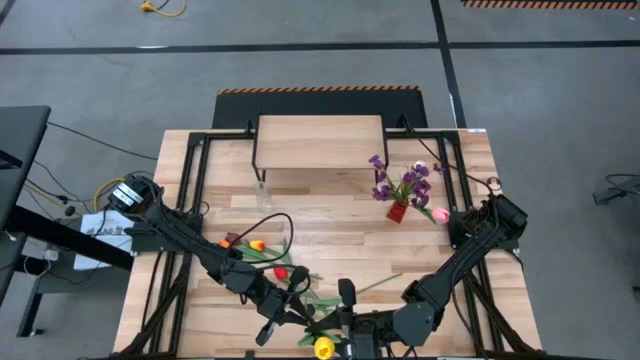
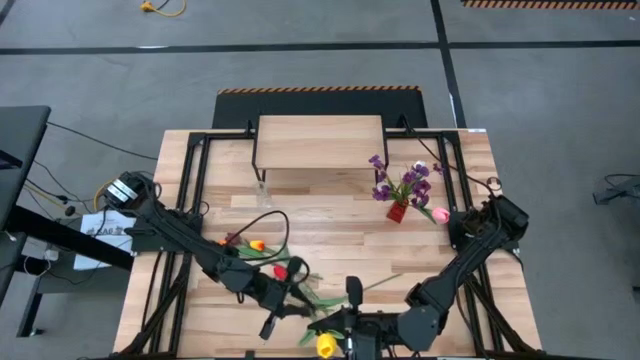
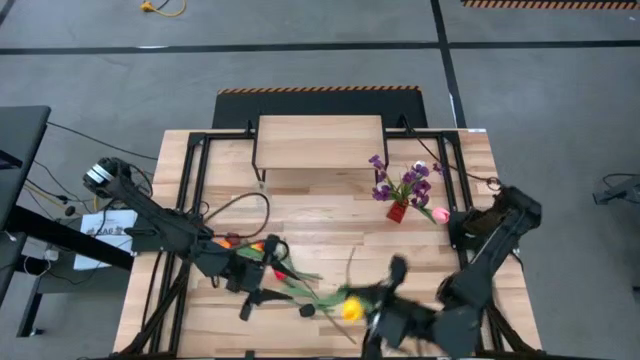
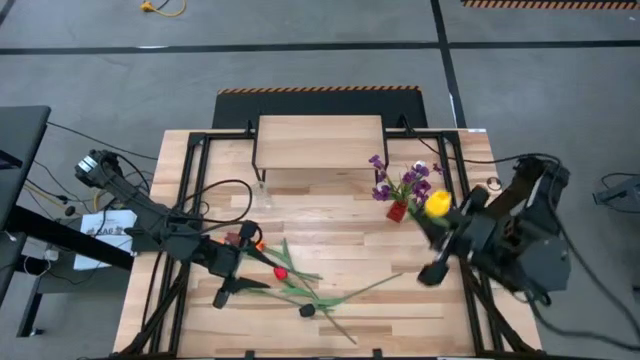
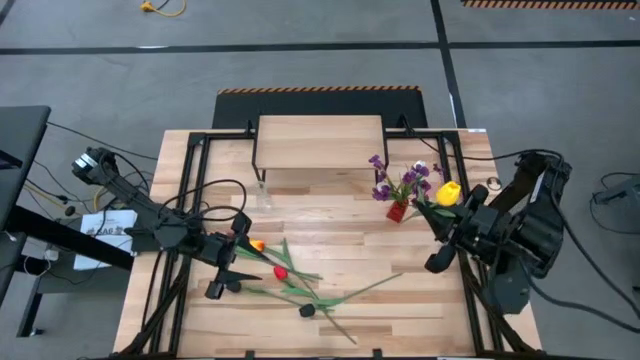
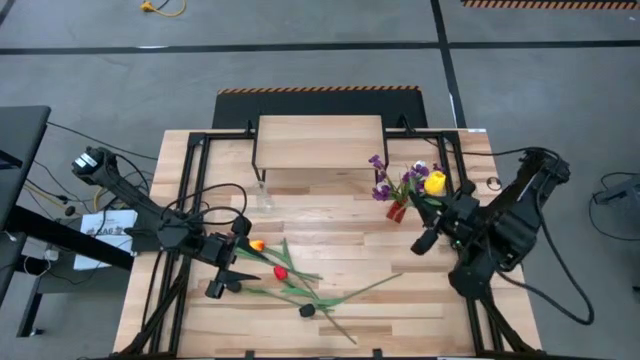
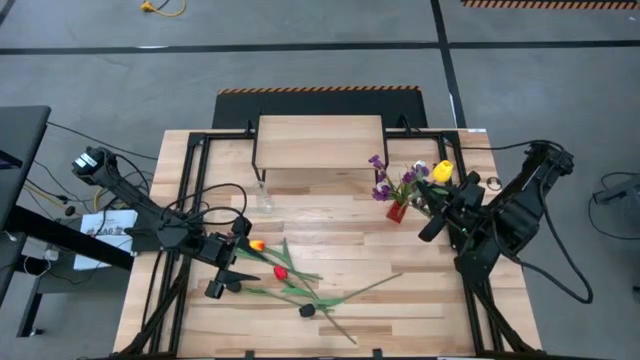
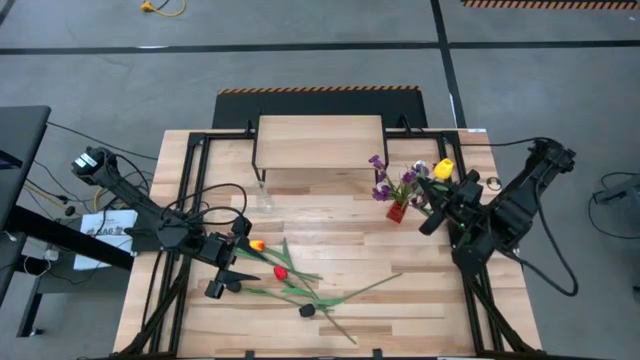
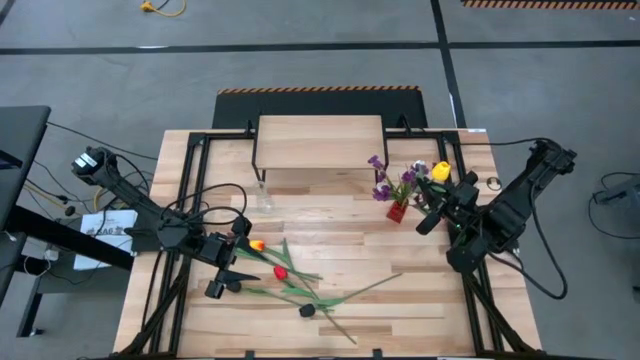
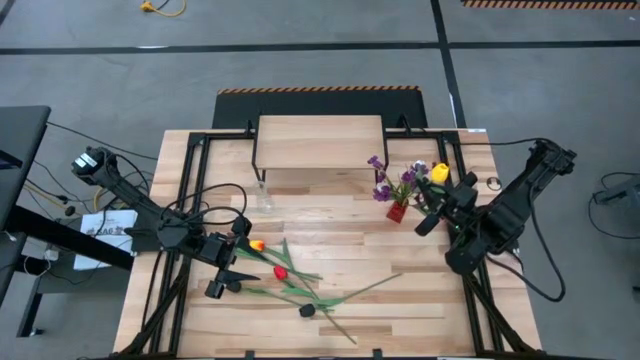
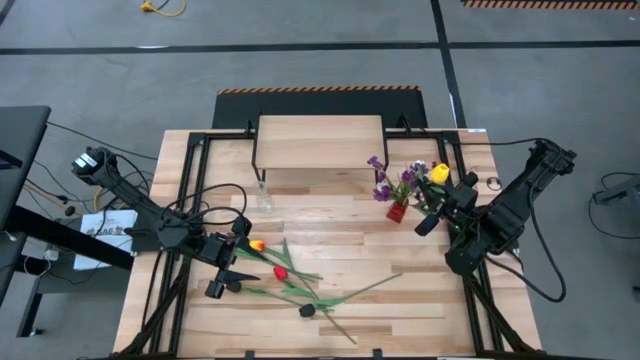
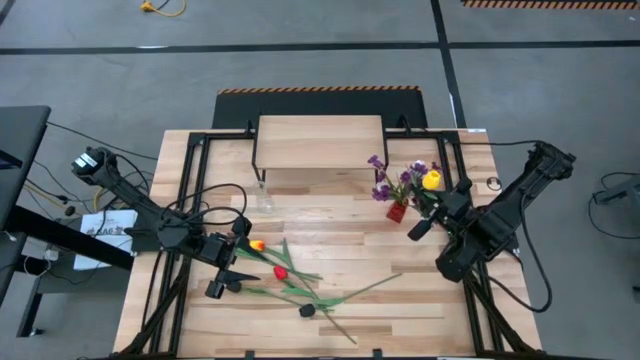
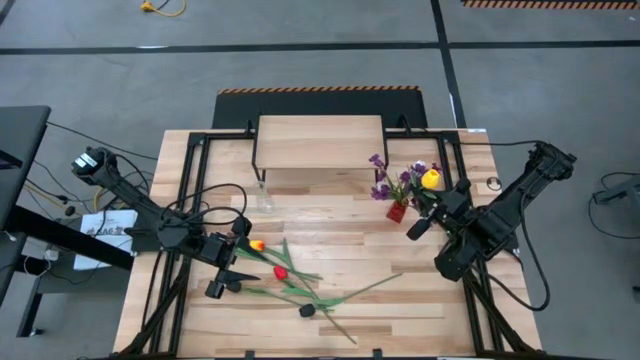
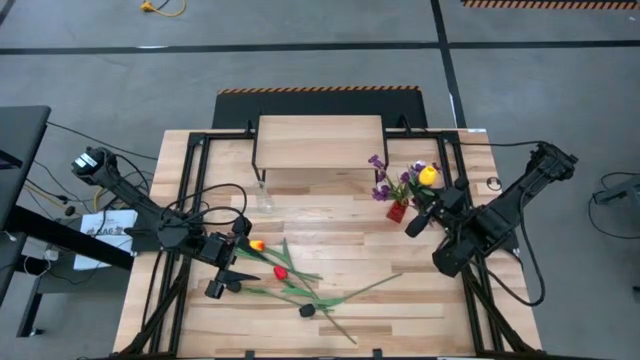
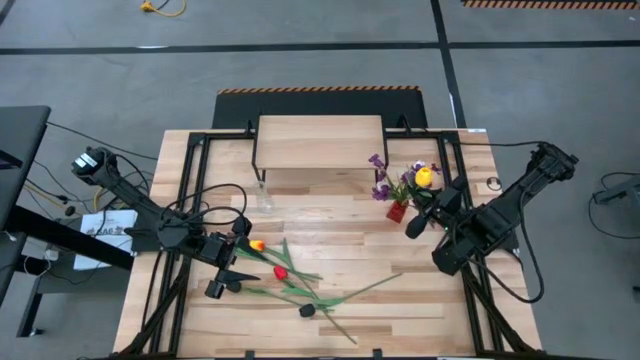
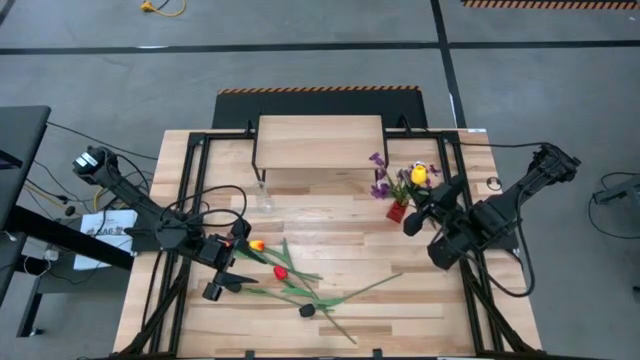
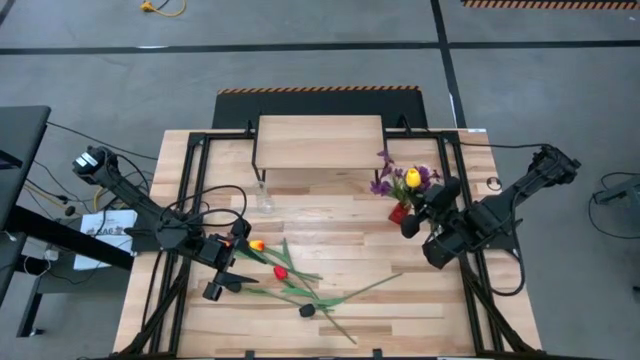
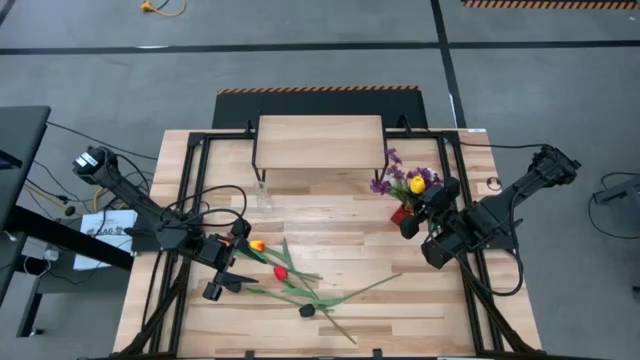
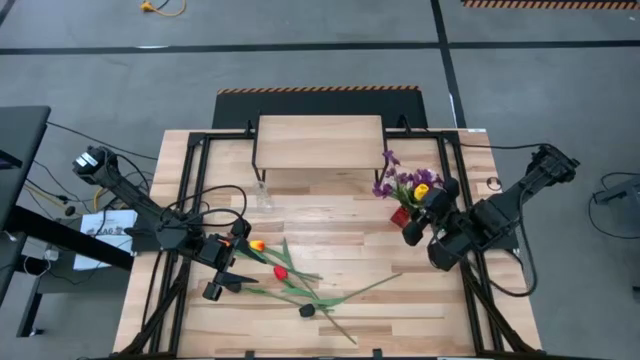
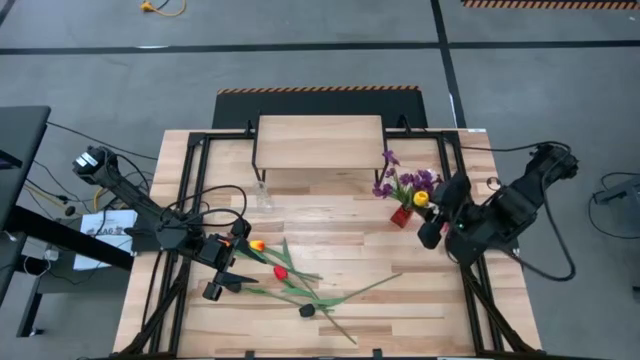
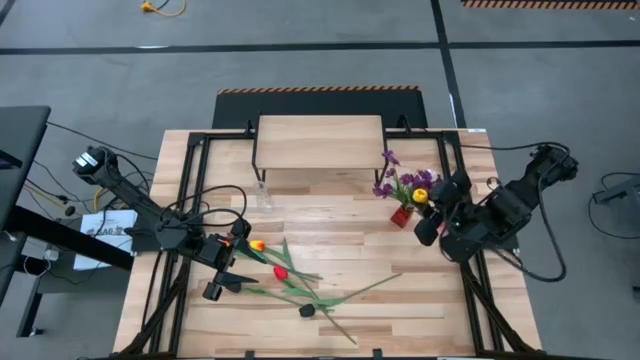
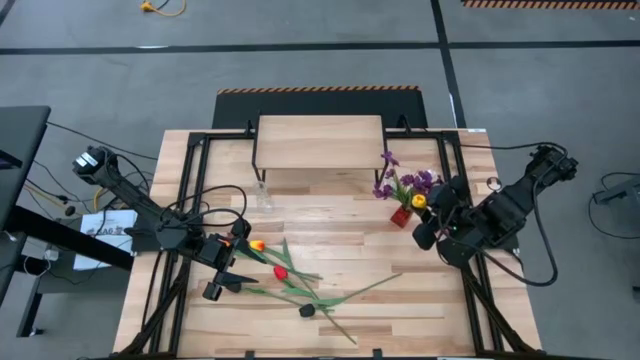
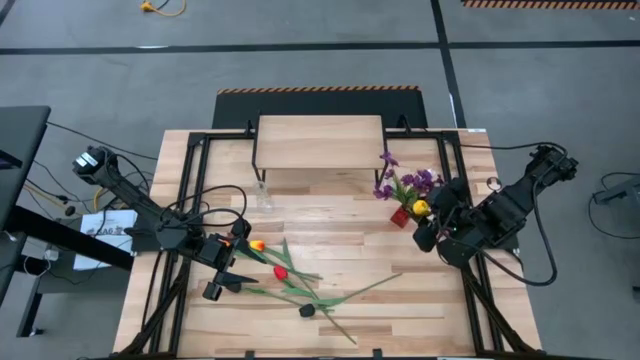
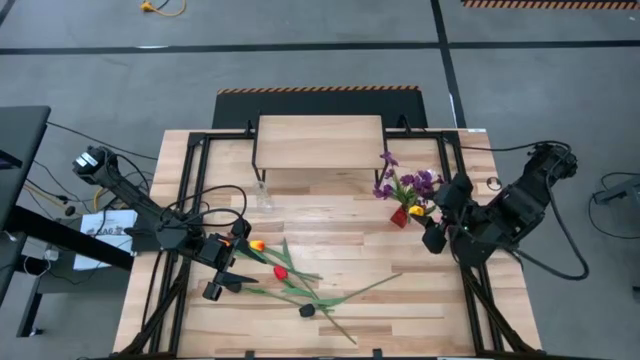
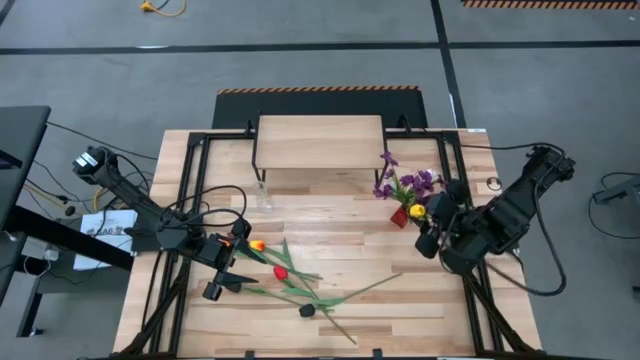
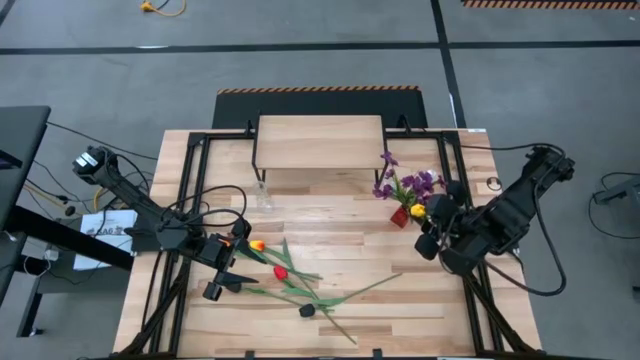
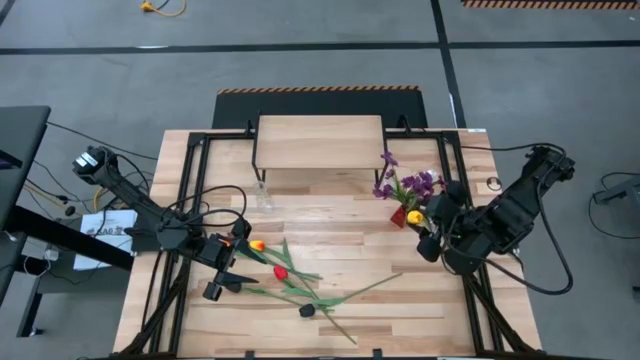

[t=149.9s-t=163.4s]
Task: Pick and place flowers into a vace then onto a shelf
Put the right yellow flower into the red vase

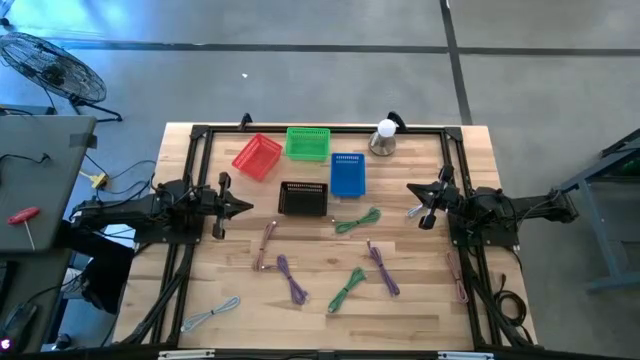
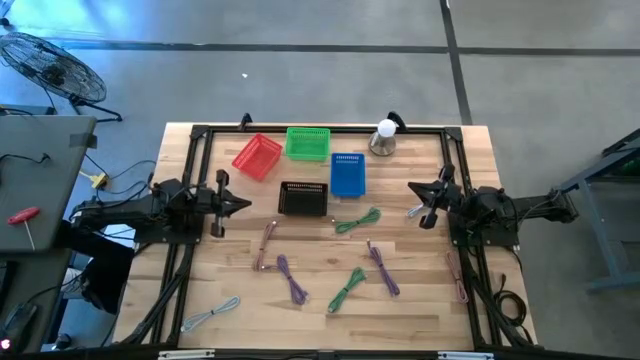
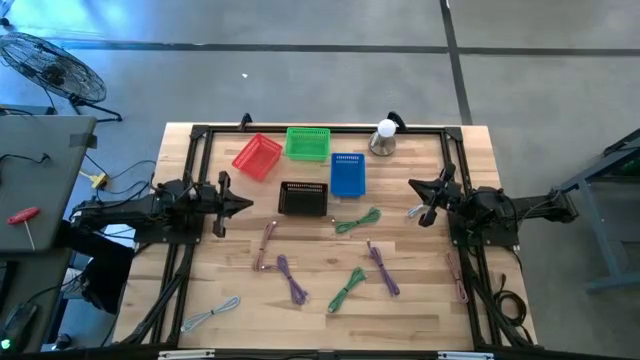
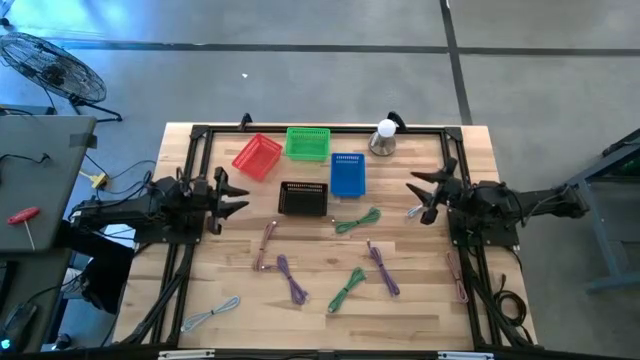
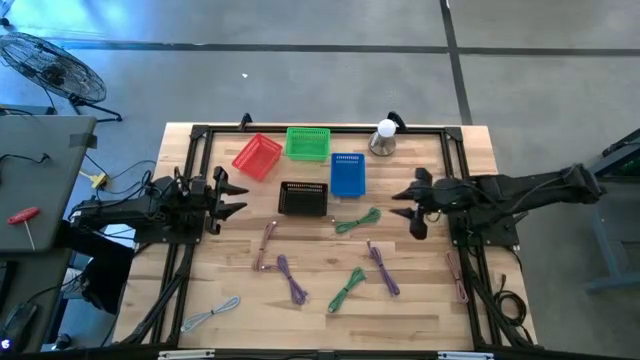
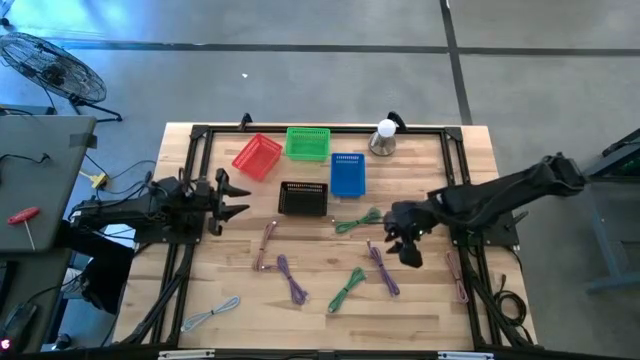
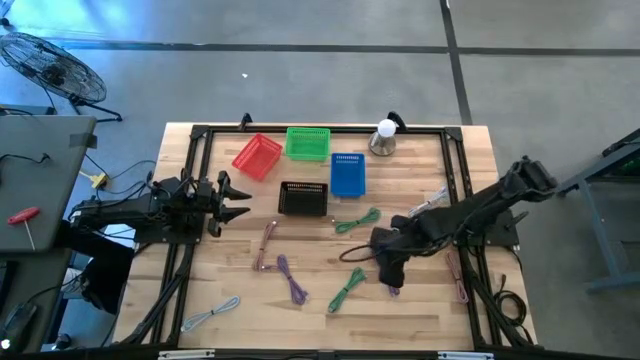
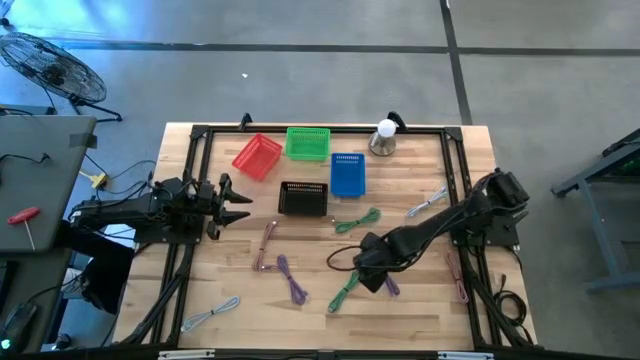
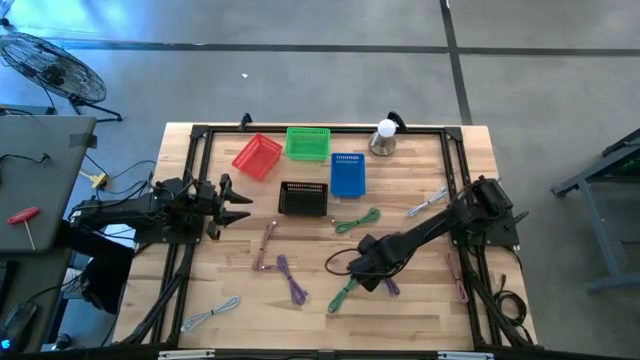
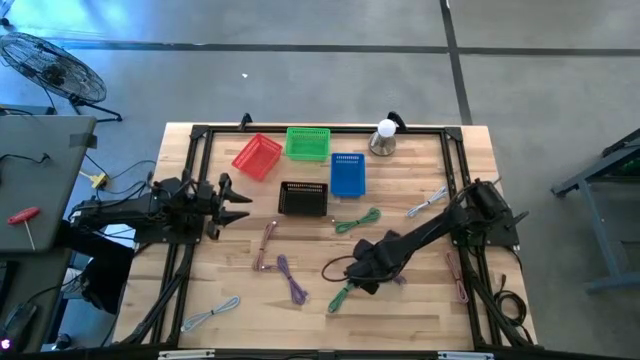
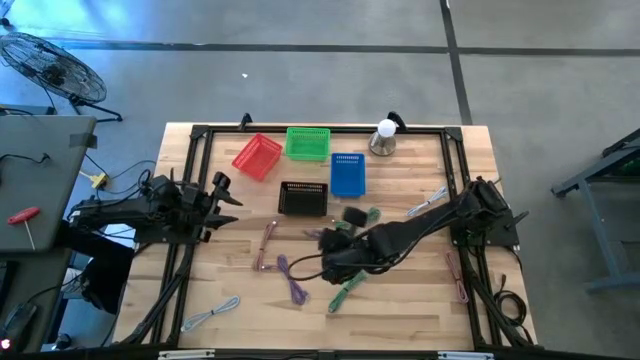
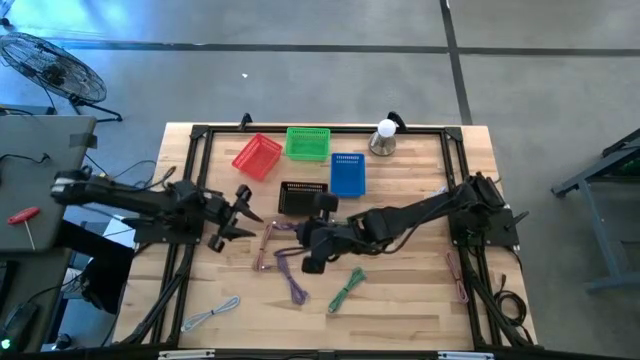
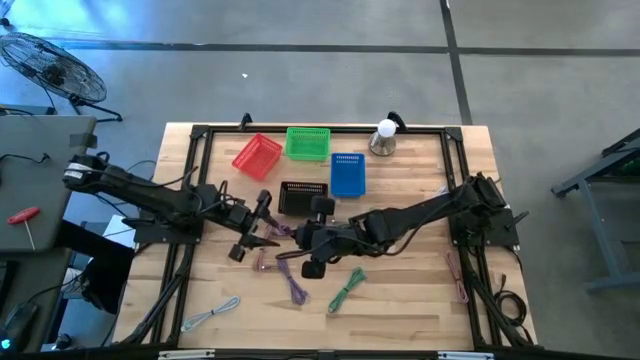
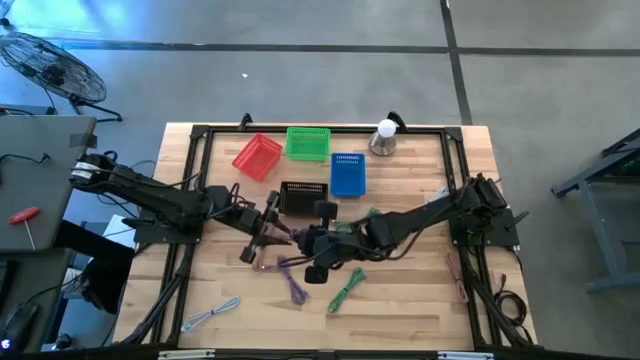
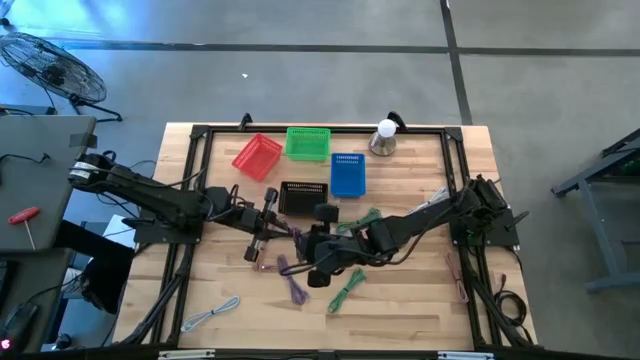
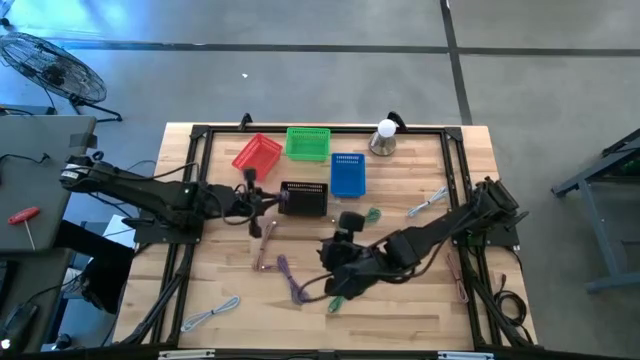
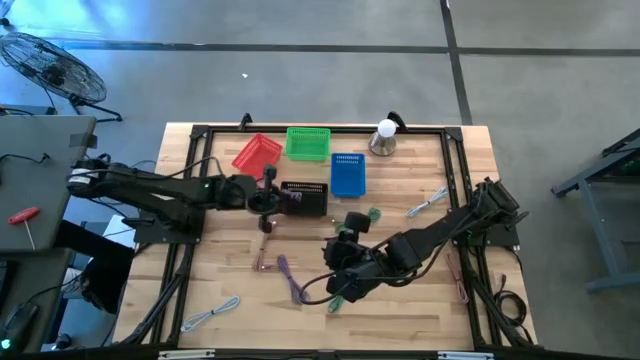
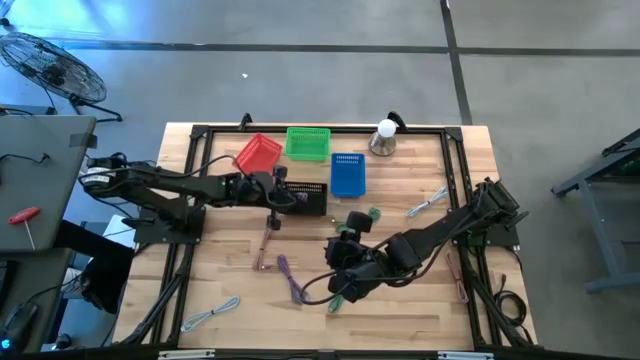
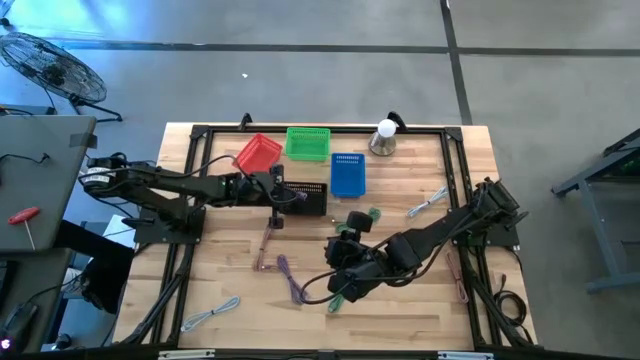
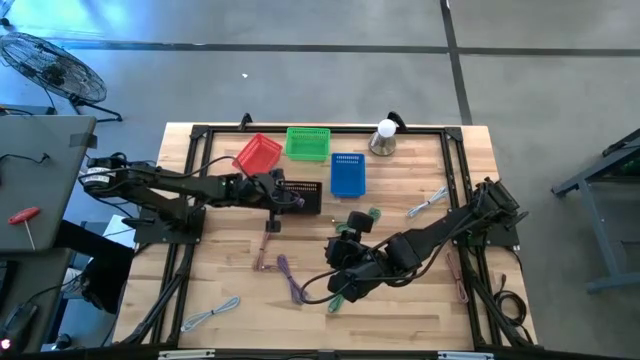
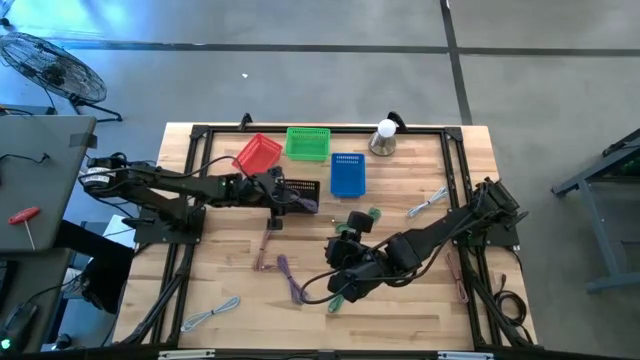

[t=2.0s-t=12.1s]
Task: Pick & Place USB Port
Put the violet usb cable into the black bin
